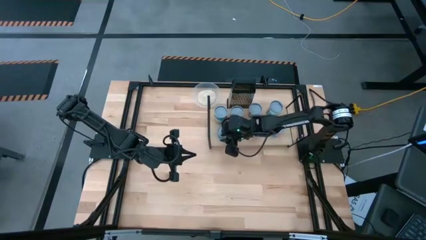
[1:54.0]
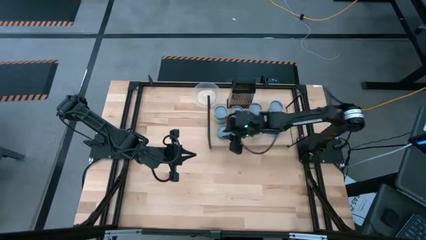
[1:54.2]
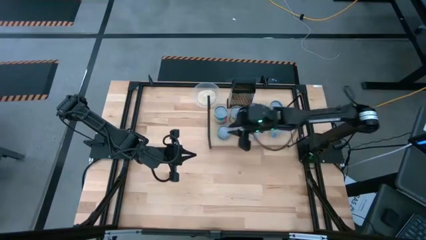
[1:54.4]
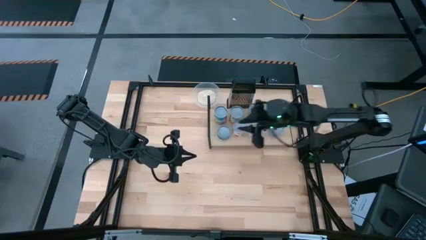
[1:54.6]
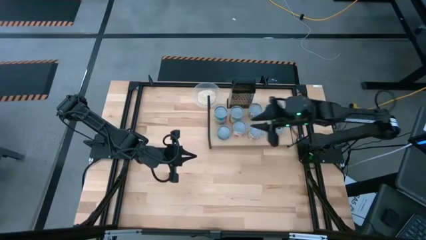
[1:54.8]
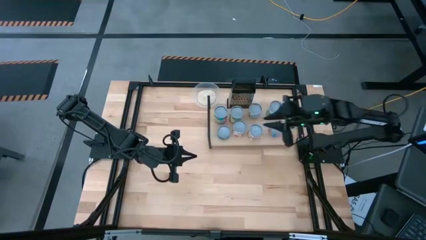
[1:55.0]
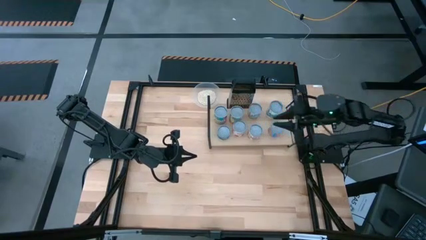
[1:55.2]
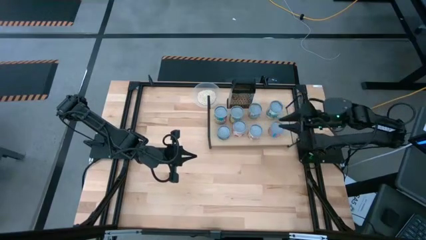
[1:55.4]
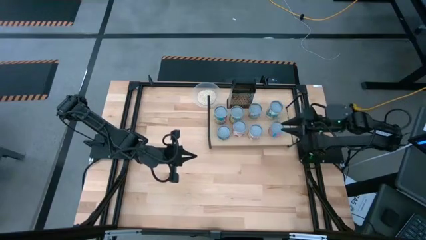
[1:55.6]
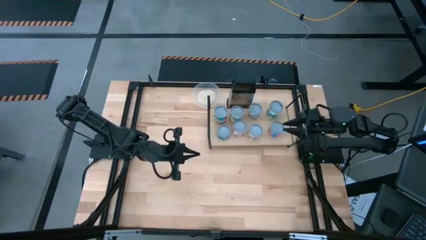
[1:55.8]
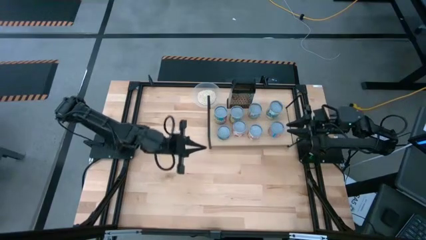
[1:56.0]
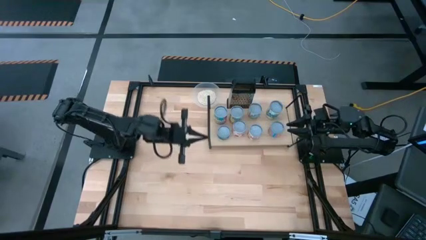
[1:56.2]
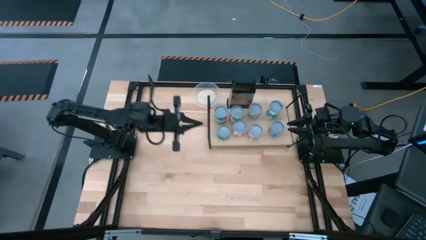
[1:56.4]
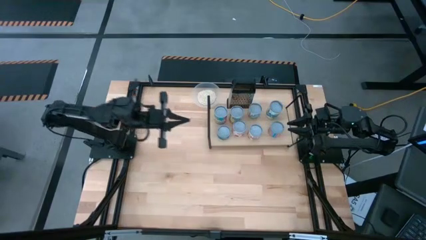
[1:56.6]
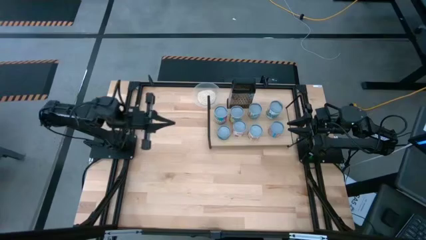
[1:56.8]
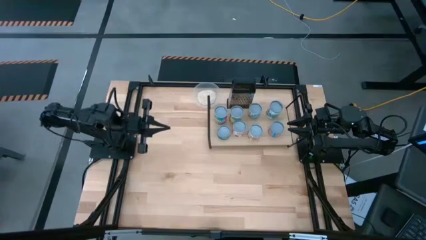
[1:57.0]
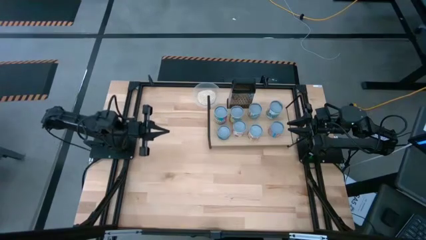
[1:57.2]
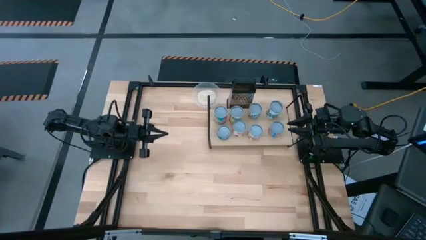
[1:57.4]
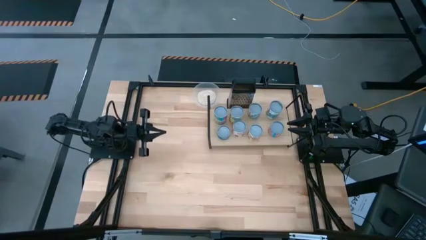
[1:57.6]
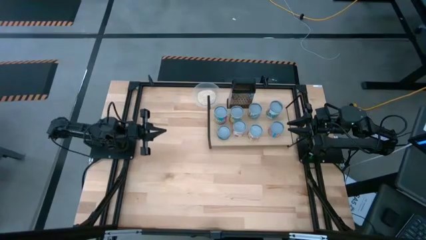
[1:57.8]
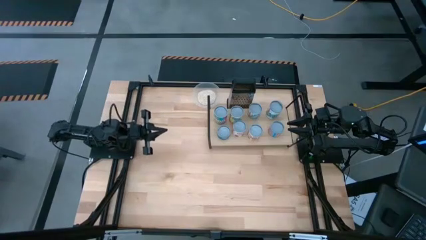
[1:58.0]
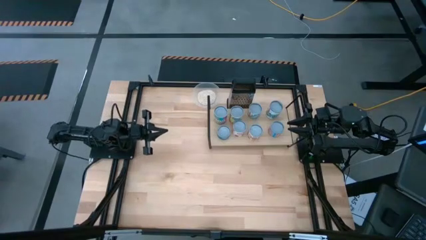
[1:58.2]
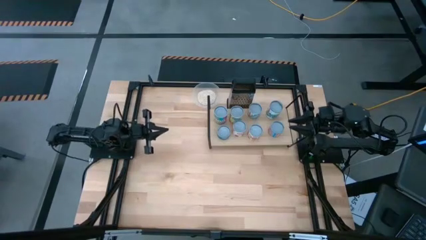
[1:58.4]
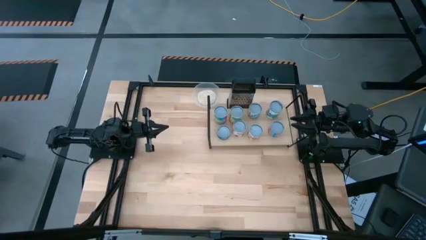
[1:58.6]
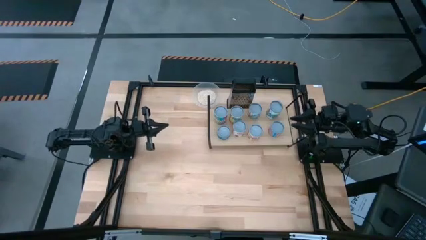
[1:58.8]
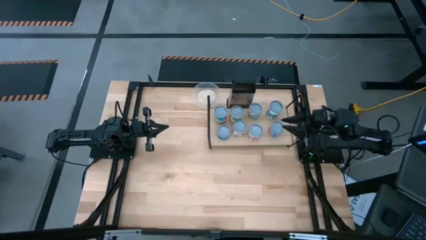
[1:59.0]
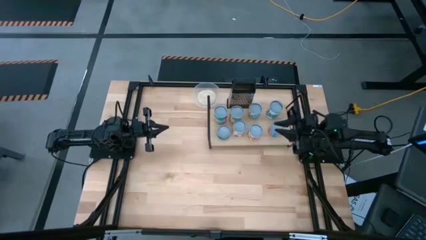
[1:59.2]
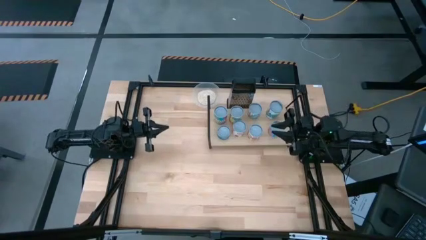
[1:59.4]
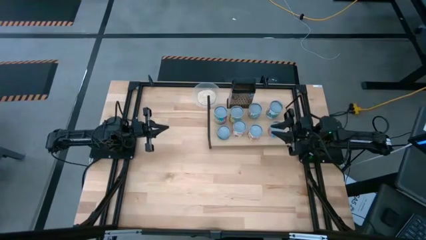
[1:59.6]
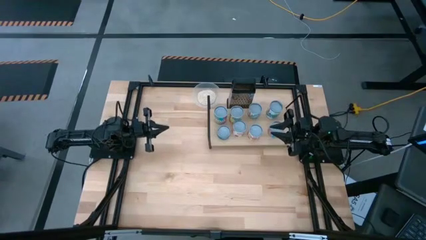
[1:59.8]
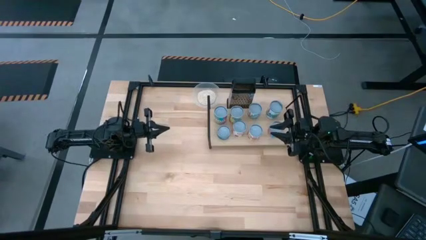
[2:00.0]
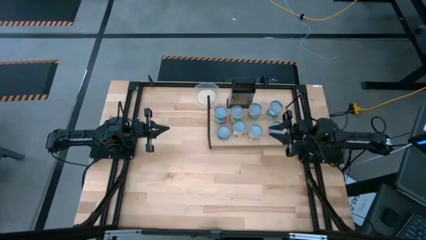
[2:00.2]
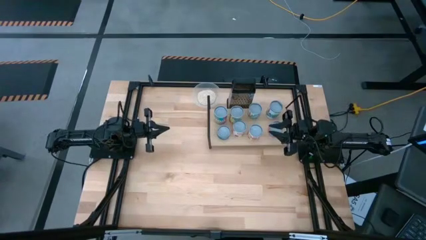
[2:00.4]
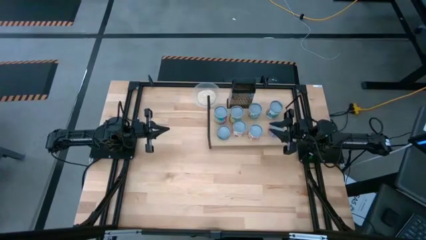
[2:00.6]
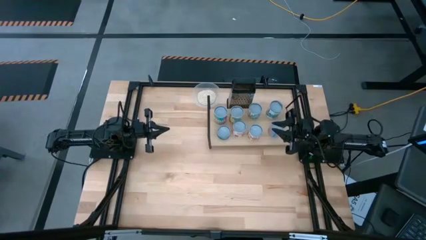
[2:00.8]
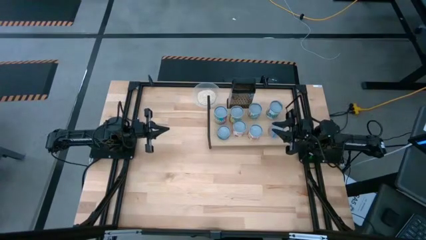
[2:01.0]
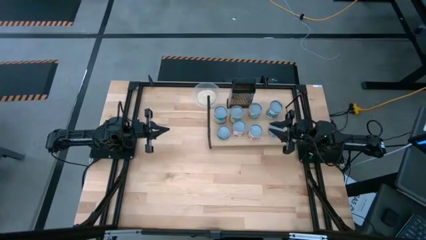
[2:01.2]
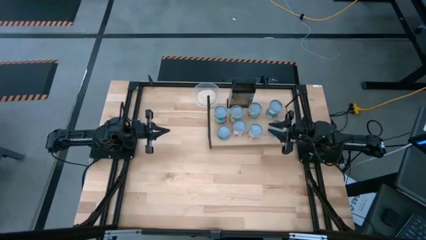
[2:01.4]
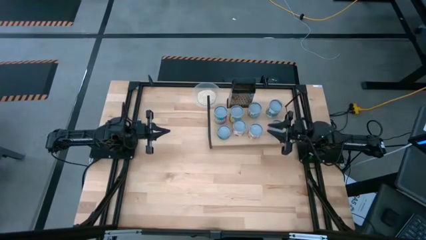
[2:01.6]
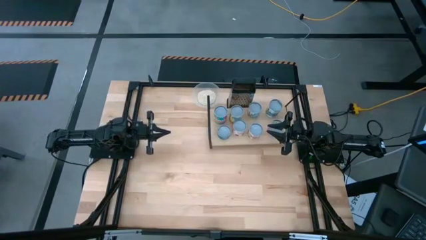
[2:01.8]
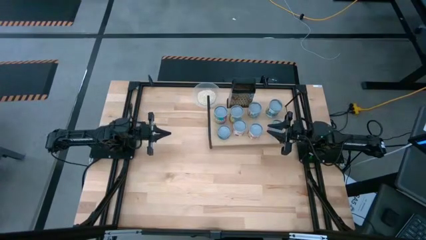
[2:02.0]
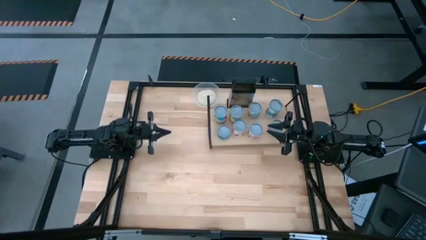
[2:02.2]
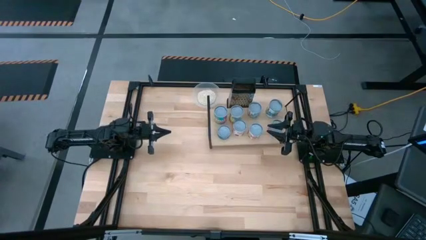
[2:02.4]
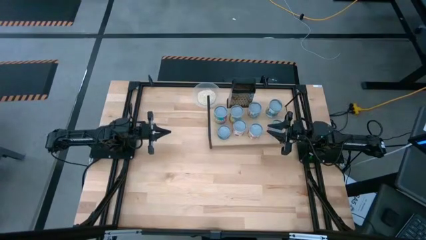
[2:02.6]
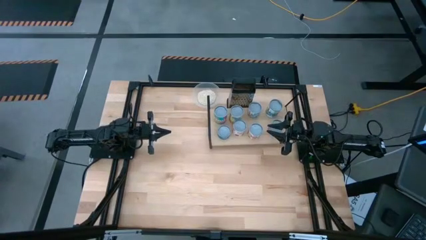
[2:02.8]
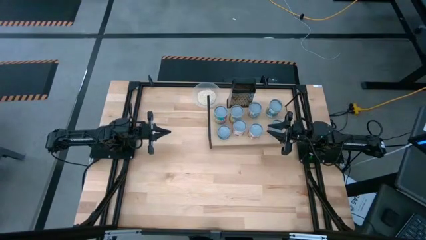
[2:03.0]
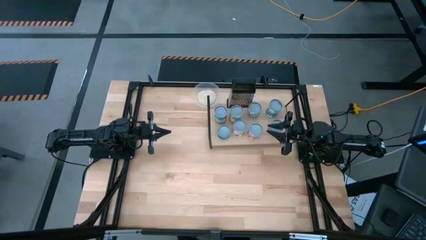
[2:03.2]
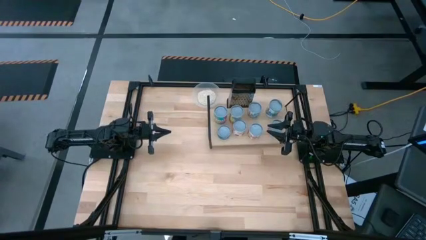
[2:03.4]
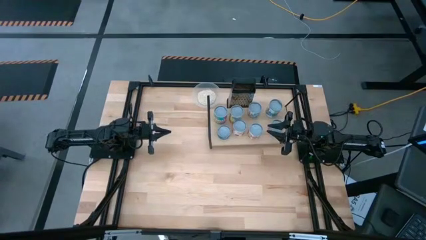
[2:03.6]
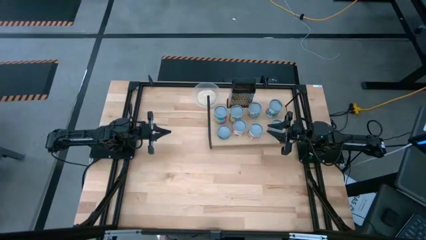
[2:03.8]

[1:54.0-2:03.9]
Task: Pick and place cans onto a shelf
Return to Home Position

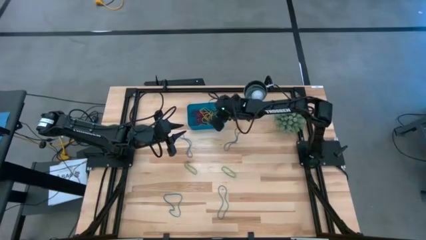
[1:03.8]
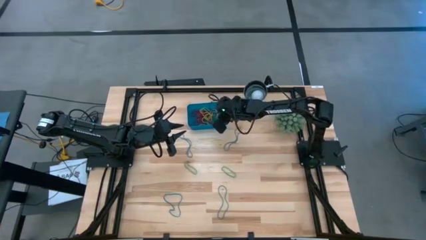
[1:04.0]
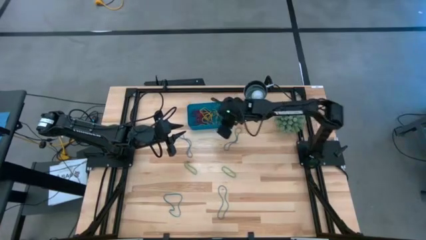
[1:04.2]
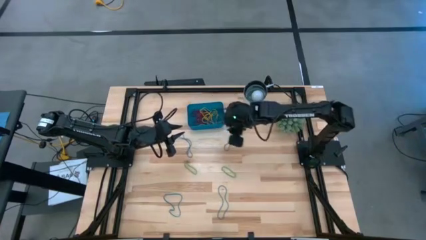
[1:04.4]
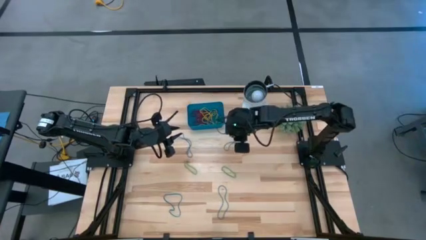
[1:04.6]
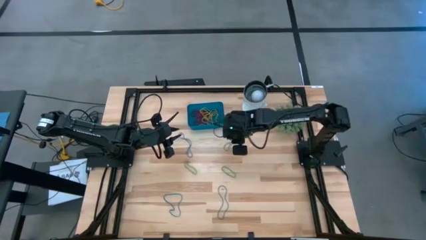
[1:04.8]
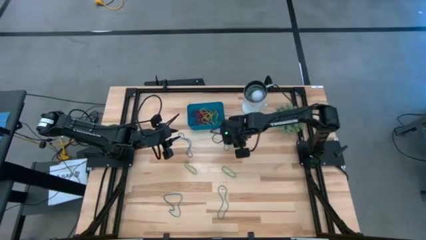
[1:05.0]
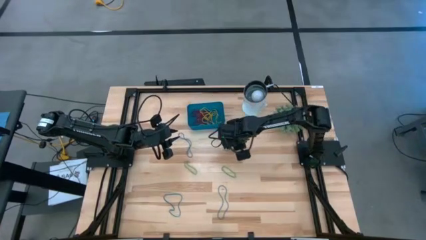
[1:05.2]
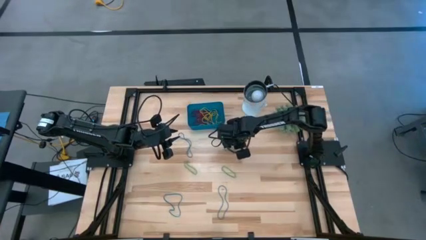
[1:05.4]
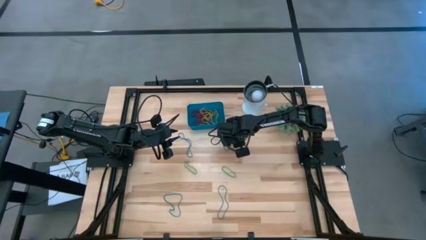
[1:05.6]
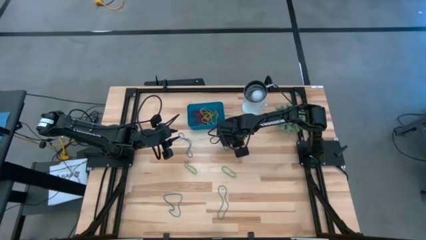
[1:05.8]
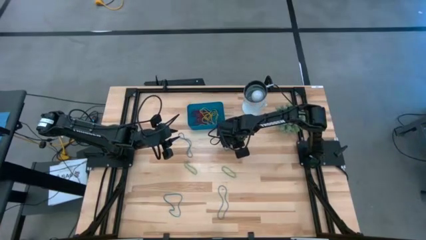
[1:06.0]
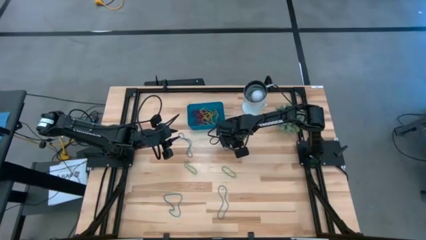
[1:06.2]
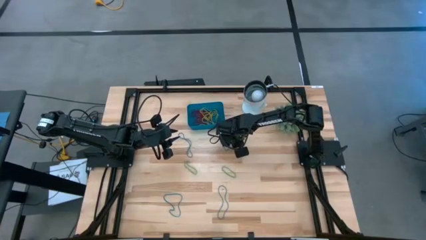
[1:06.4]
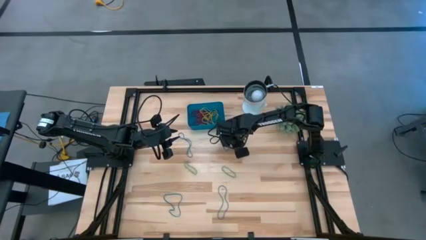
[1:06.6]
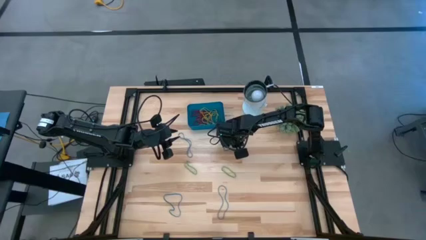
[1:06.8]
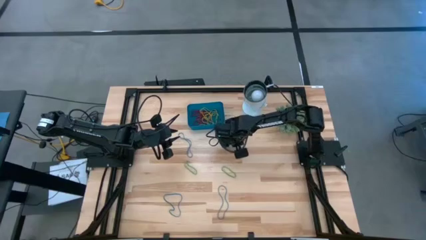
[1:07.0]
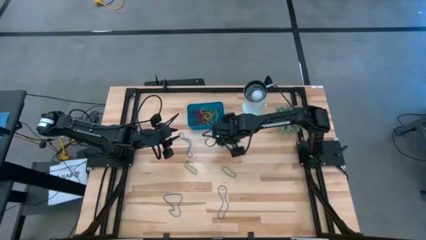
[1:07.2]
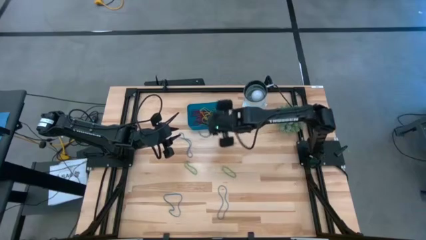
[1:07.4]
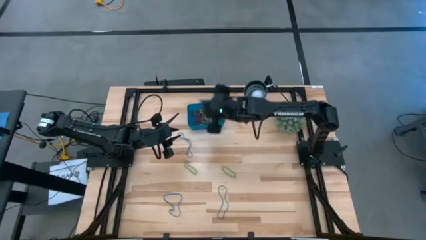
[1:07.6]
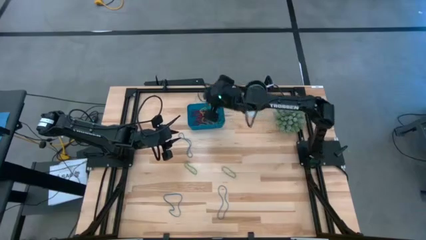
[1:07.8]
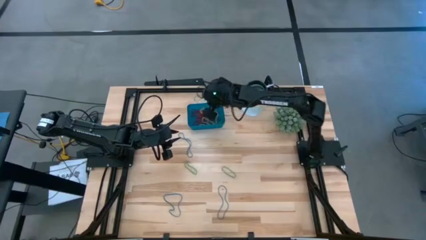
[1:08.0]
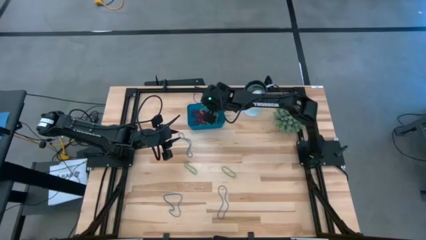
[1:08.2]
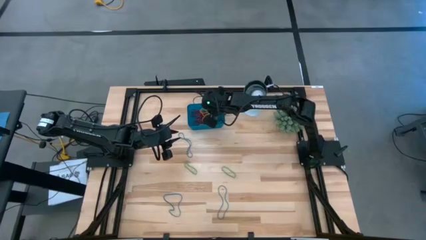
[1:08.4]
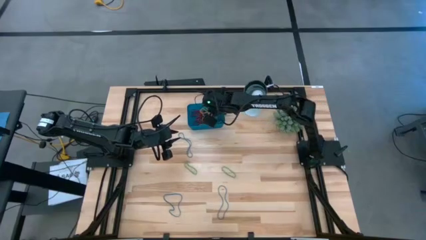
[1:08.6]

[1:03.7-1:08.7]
Task: Pick and place items into bin
Put the blue rubber band into the blue bin
